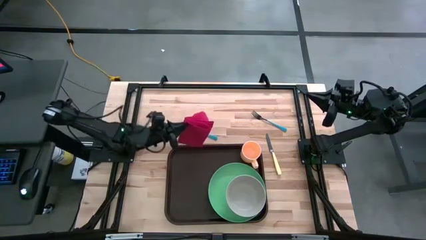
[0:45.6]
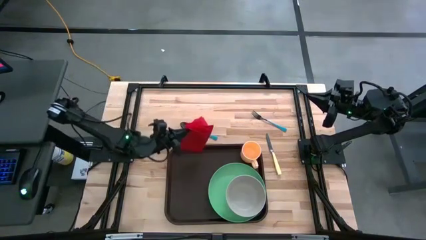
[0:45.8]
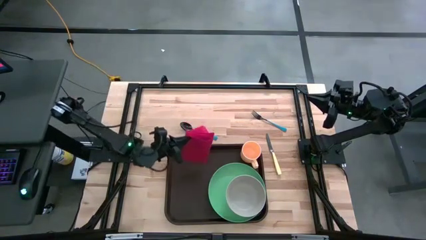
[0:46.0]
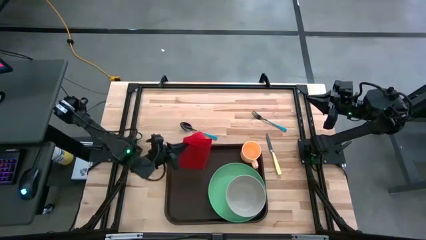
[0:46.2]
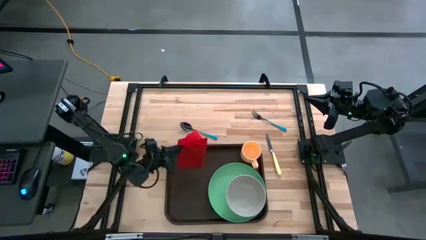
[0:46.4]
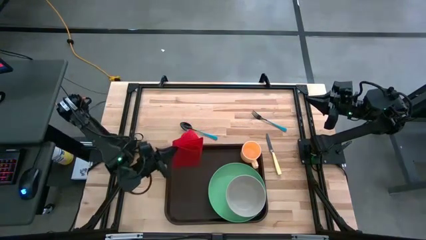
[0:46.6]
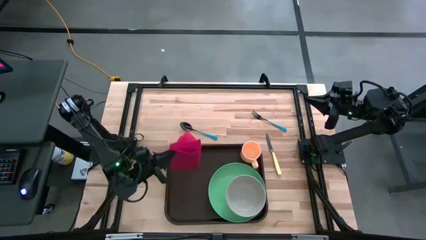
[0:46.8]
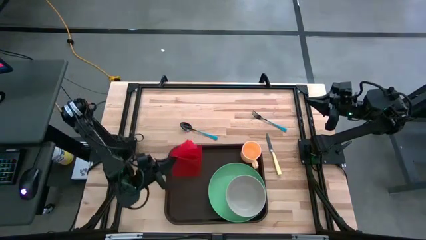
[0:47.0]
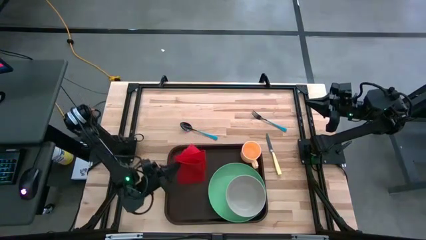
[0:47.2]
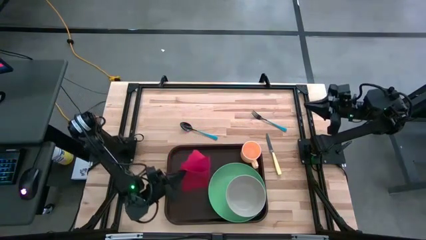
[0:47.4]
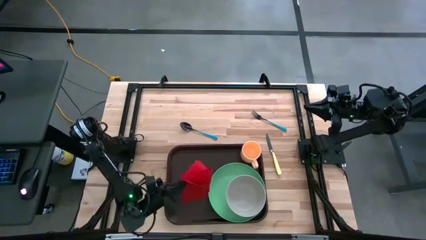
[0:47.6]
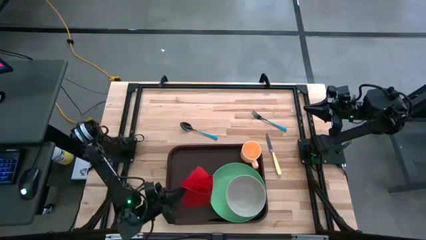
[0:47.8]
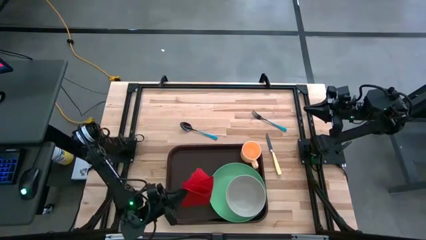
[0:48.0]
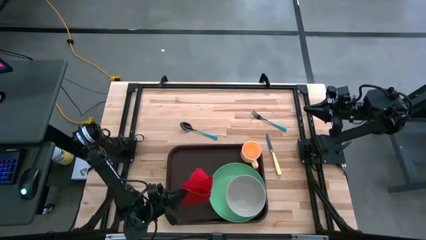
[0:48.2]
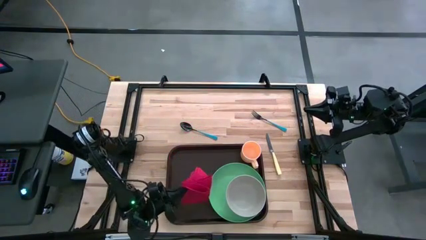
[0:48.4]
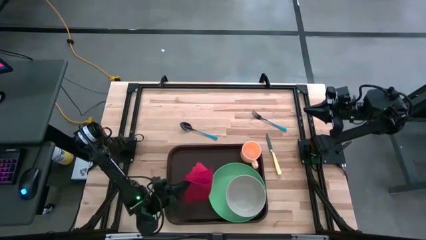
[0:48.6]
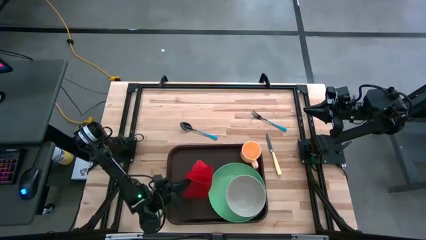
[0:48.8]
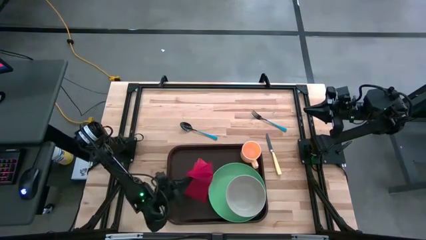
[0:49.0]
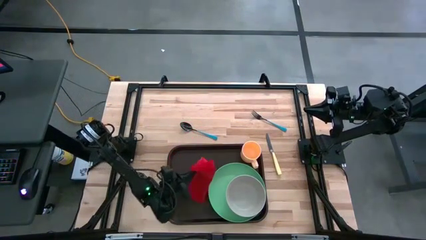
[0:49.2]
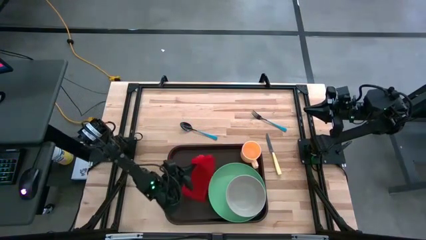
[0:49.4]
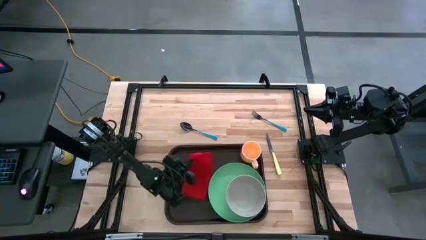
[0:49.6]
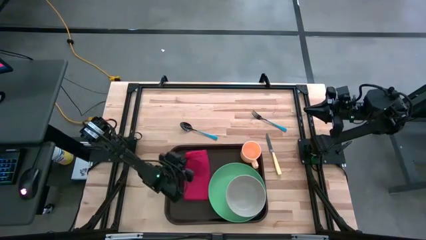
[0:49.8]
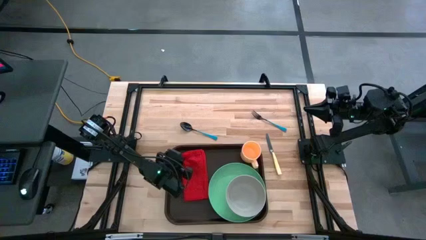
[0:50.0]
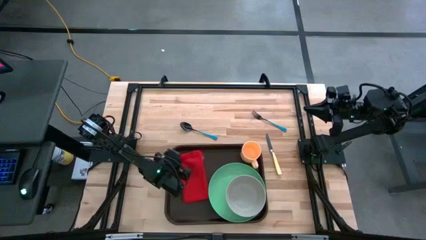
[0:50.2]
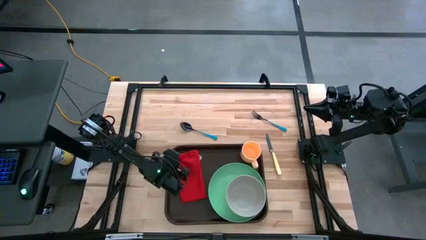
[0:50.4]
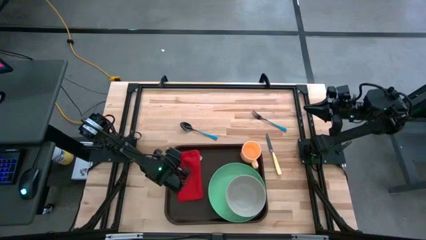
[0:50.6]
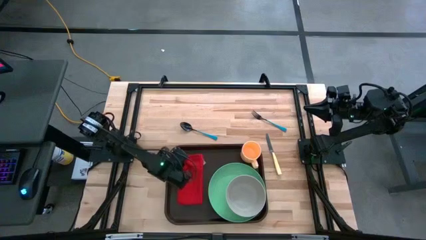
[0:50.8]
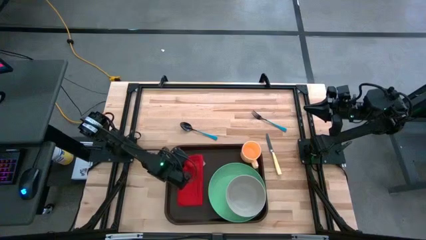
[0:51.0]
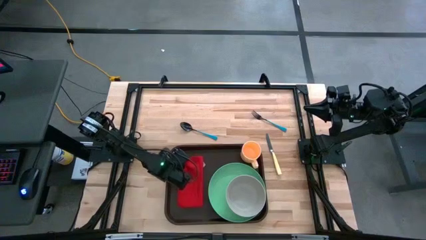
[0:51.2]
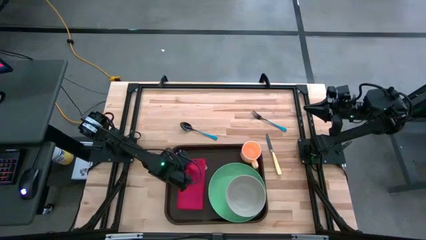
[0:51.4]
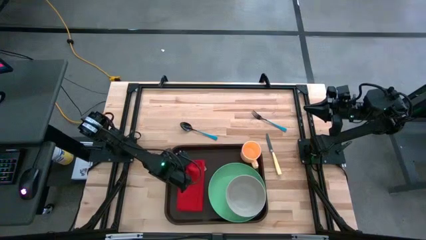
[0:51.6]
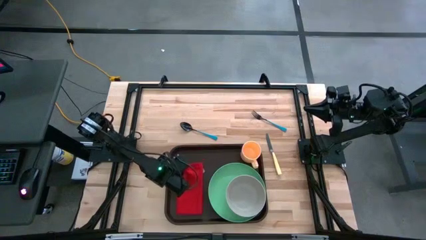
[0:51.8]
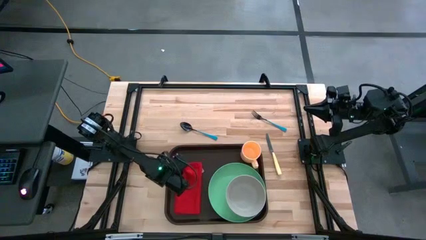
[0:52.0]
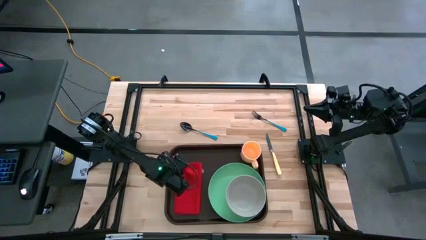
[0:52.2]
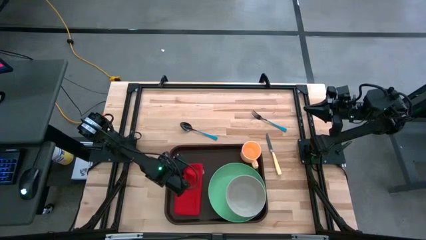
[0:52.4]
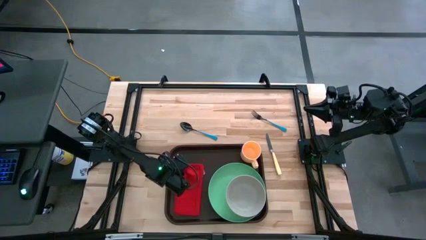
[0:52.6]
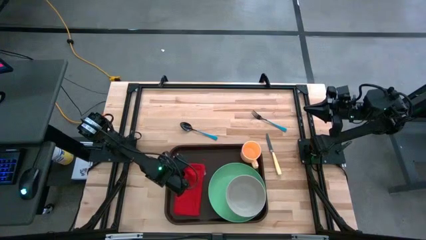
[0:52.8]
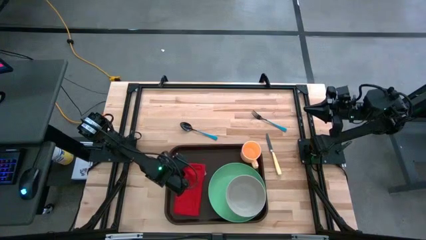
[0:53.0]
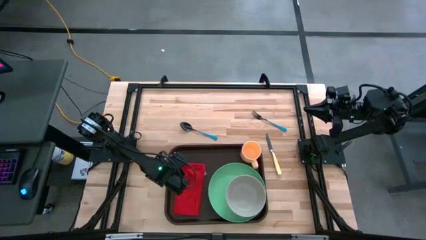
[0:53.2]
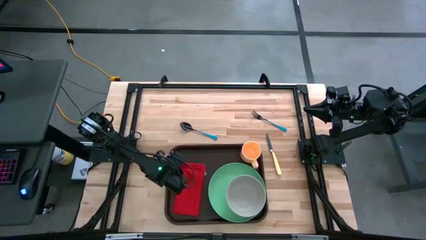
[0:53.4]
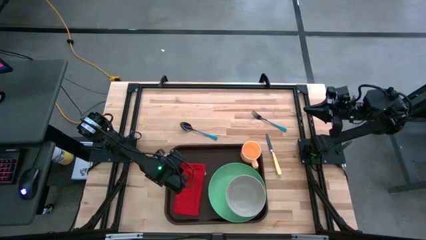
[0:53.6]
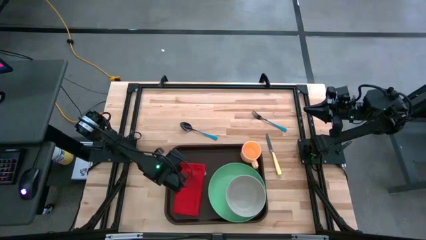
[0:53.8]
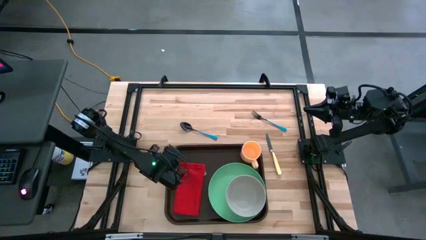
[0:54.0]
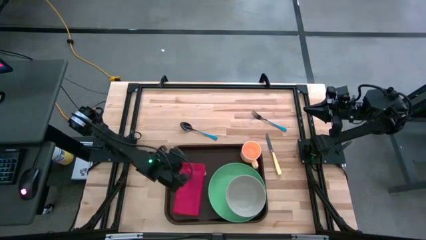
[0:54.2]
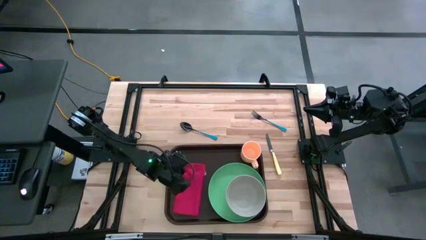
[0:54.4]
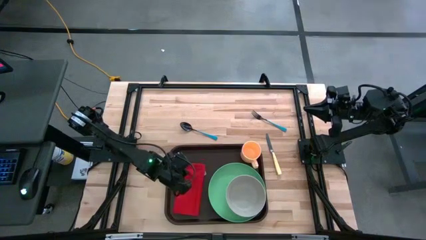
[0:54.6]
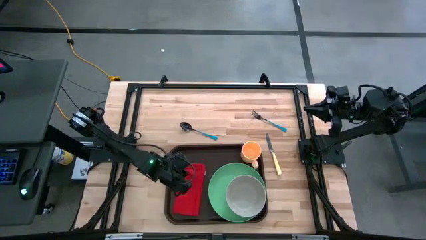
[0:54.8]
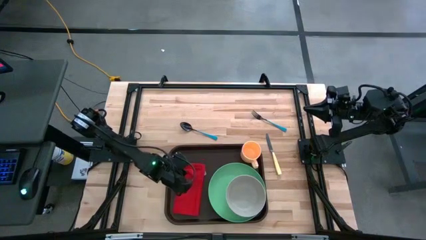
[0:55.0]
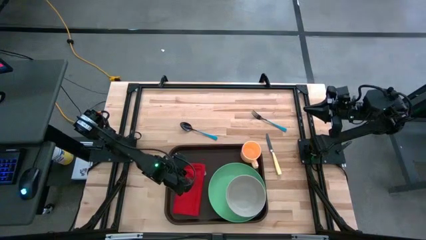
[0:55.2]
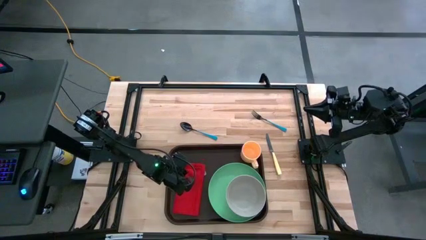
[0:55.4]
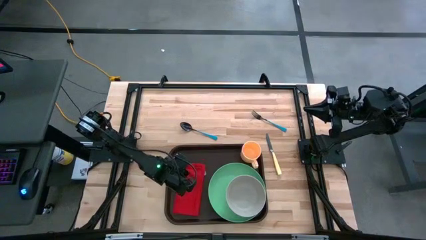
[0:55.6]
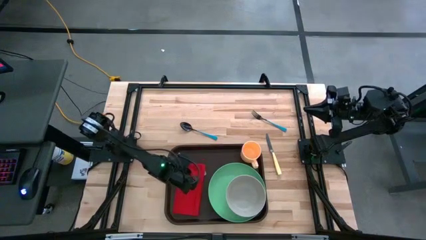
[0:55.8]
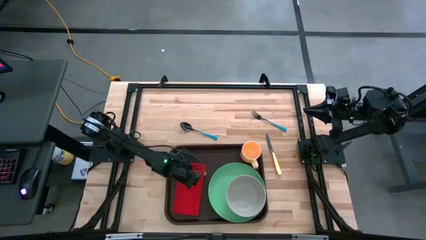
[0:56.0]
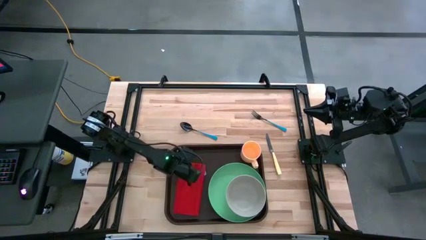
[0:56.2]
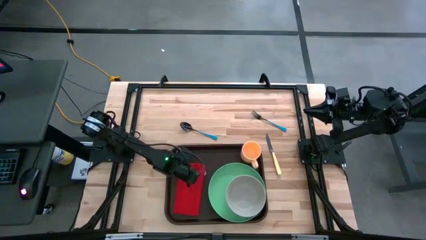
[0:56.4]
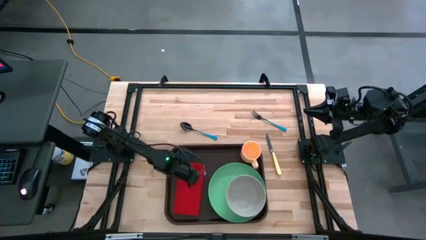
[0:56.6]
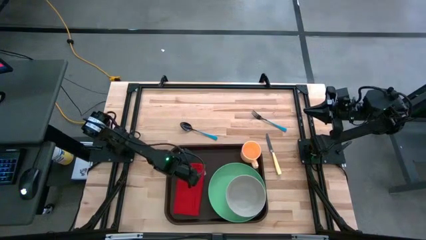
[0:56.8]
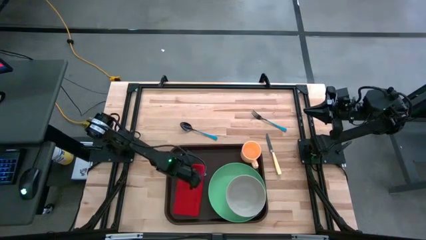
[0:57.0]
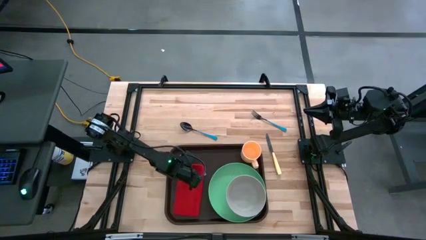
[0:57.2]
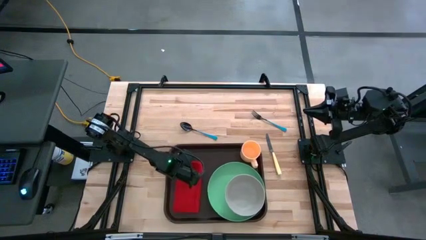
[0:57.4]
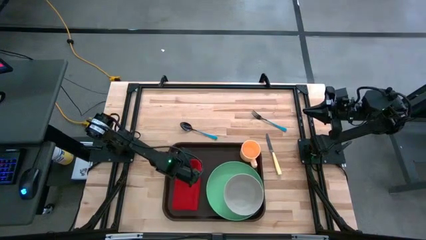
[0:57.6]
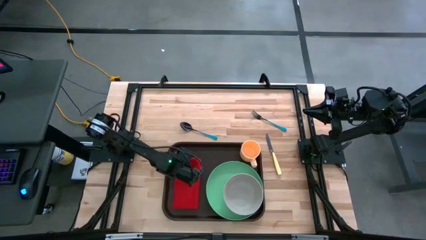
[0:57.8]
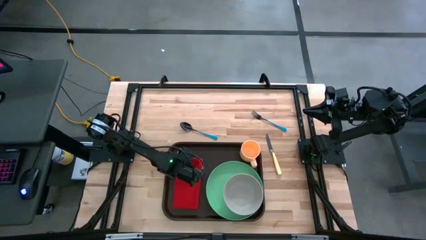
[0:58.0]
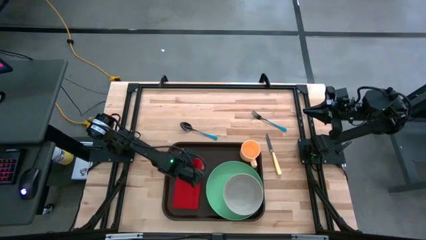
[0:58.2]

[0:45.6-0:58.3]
Task: Set up tray
Put the red napkin to the left of the green plate on the brown serving tray

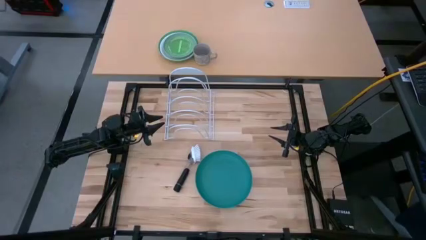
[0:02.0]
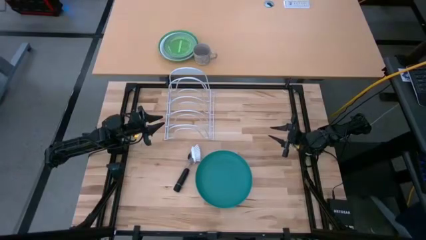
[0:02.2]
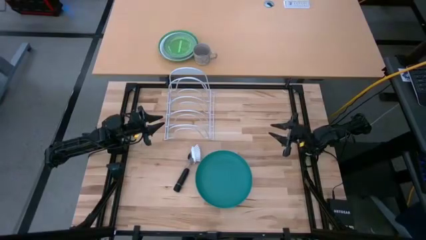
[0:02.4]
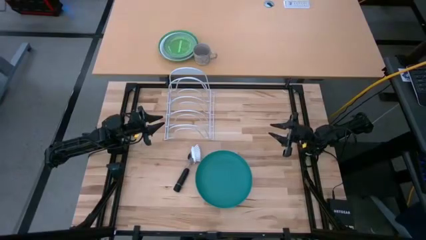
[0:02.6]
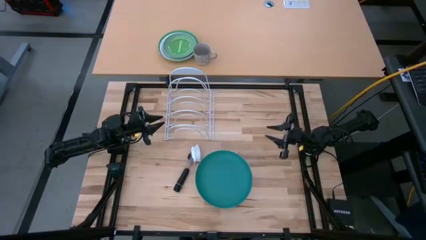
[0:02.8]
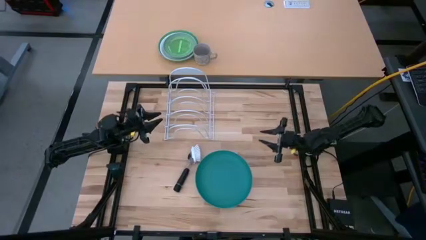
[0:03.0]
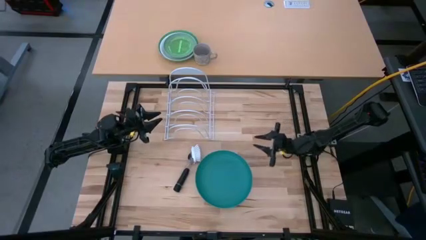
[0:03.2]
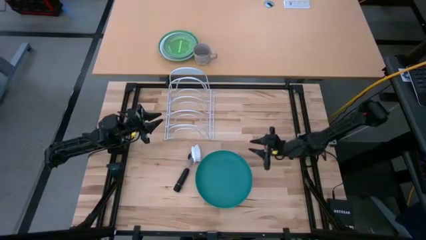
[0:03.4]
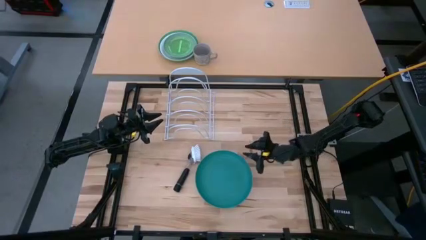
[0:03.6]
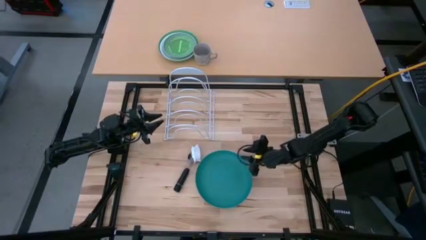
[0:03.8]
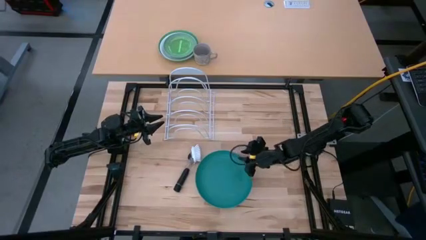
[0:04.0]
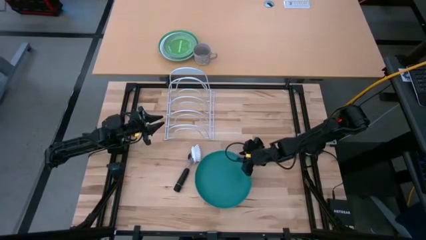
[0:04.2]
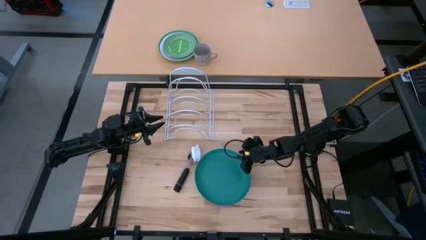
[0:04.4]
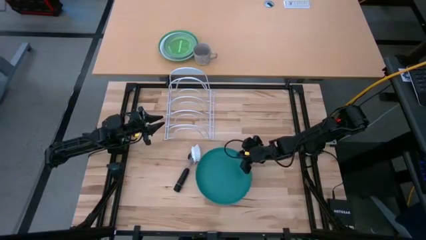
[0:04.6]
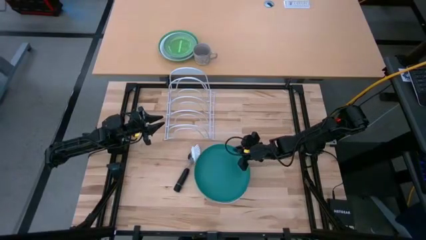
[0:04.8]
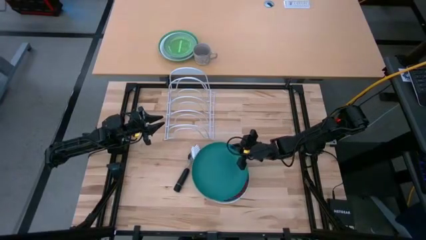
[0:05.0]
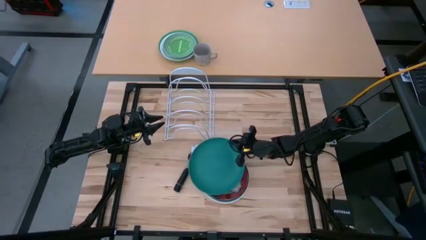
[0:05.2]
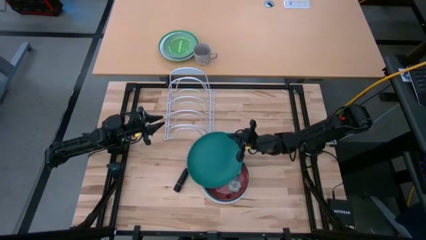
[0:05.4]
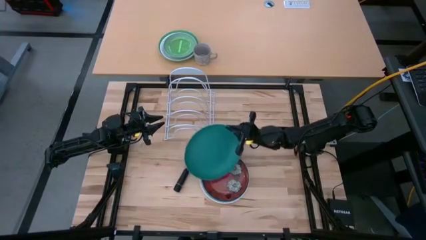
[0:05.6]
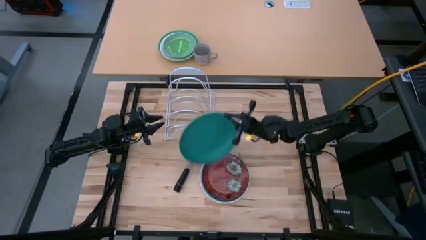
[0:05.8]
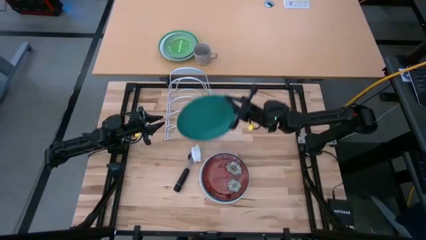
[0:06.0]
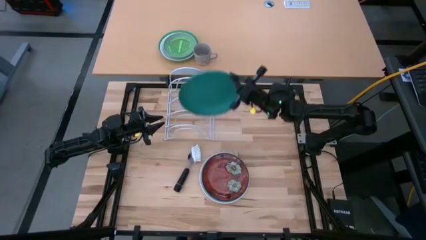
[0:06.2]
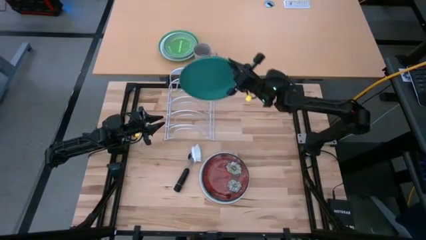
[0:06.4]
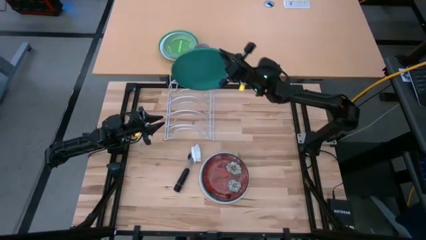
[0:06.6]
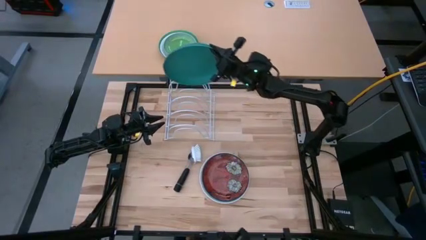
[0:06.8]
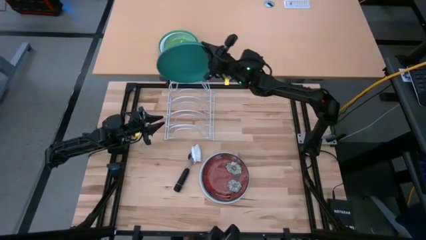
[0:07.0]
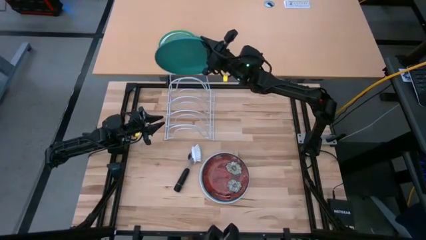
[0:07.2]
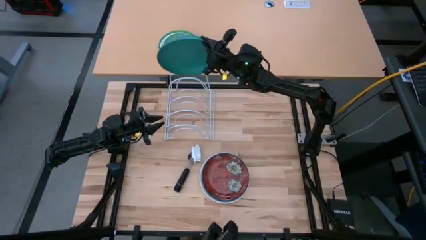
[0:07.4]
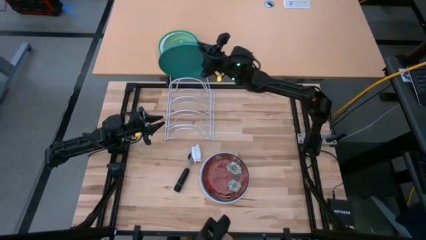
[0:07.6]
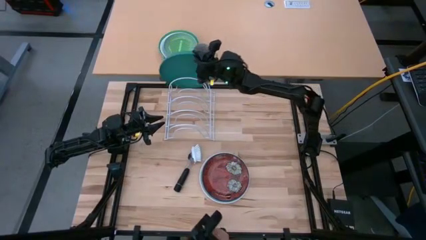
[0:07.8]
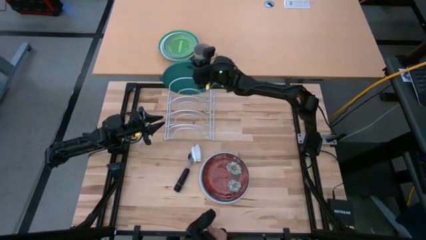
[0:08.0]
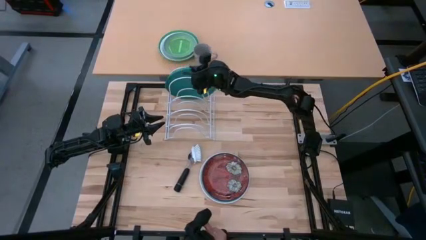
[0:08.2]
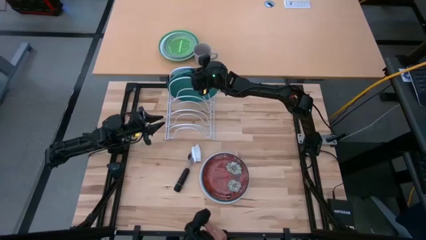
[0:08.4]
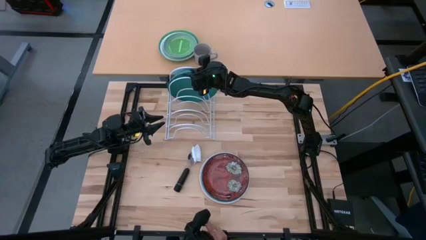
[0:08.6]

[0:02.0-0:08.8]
Task: Sort dishes
Put the green plate into the white dish rack
